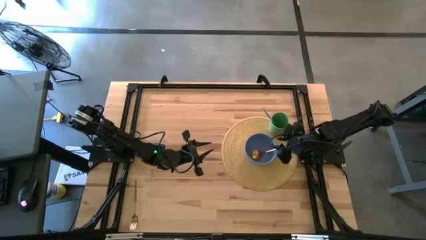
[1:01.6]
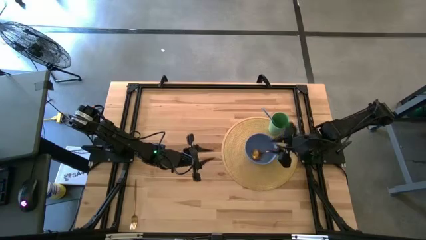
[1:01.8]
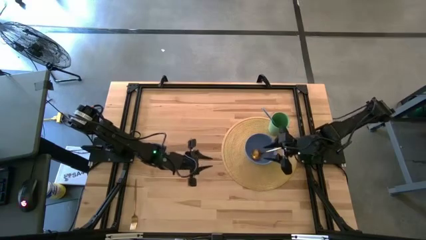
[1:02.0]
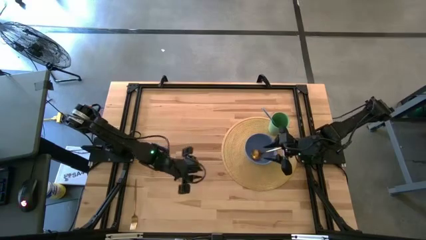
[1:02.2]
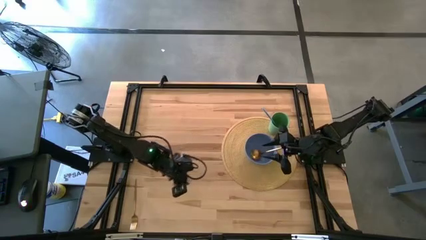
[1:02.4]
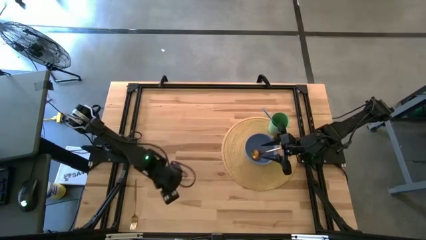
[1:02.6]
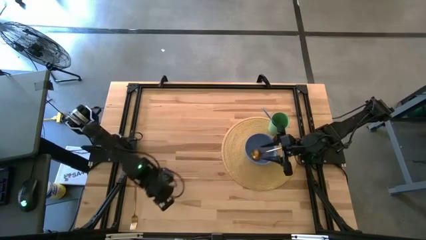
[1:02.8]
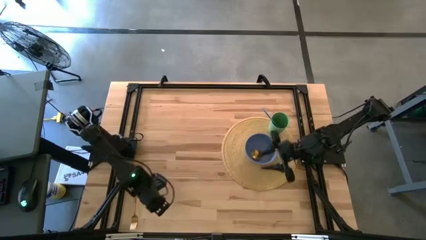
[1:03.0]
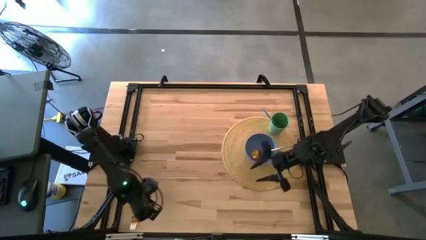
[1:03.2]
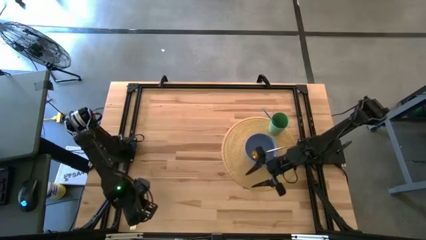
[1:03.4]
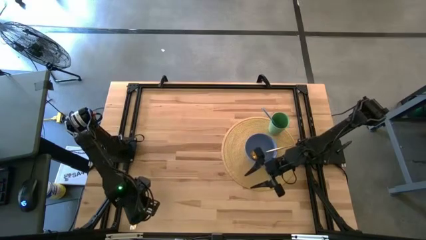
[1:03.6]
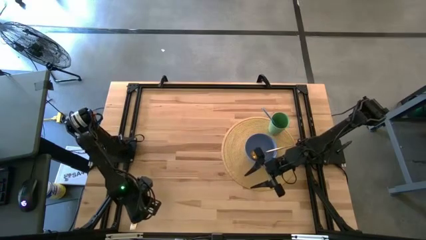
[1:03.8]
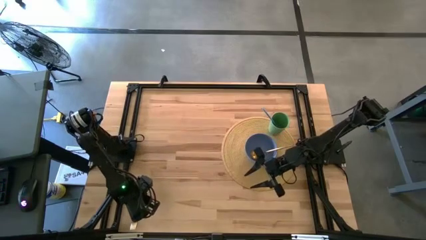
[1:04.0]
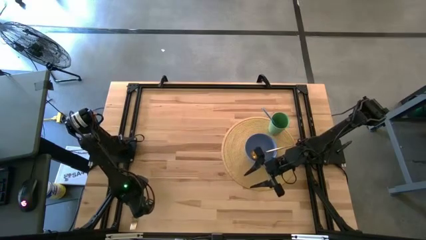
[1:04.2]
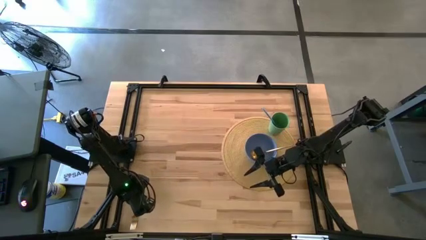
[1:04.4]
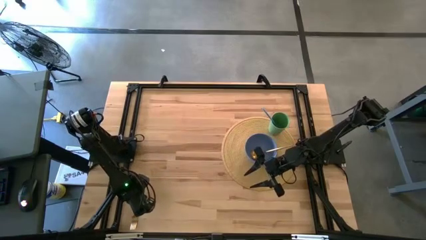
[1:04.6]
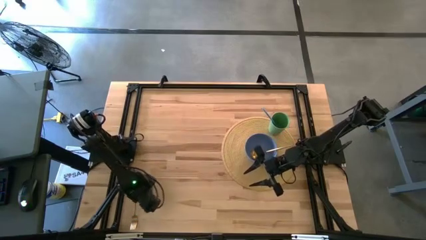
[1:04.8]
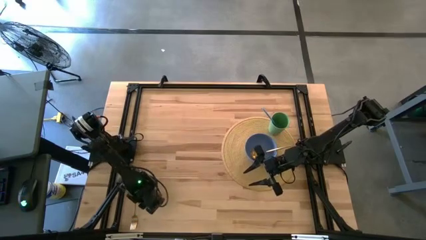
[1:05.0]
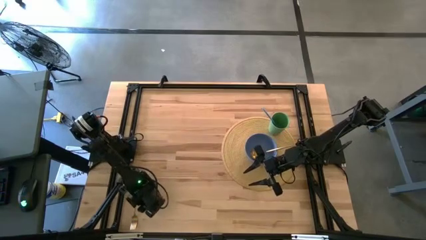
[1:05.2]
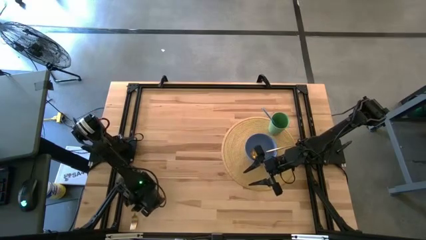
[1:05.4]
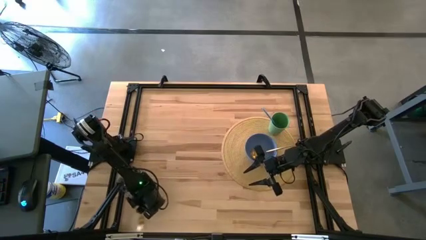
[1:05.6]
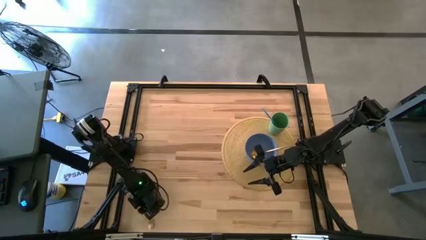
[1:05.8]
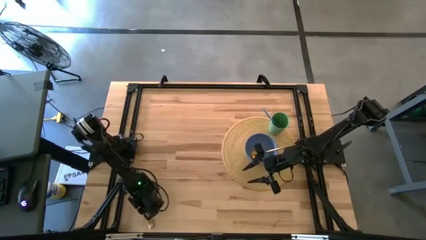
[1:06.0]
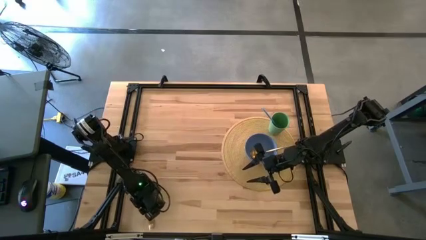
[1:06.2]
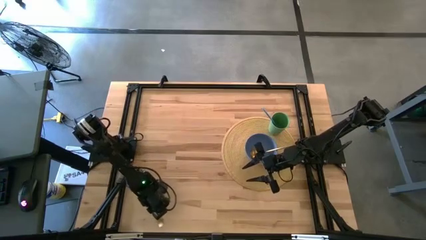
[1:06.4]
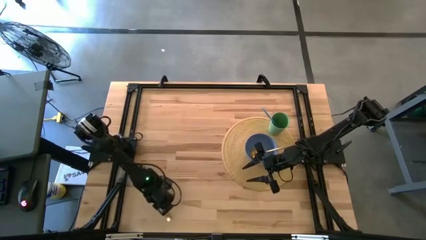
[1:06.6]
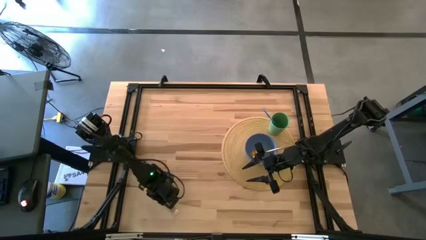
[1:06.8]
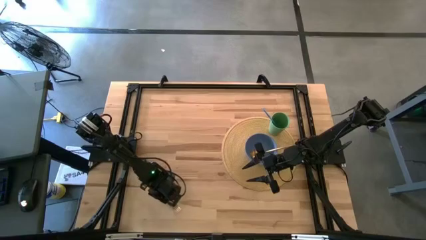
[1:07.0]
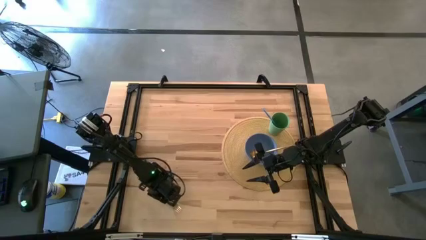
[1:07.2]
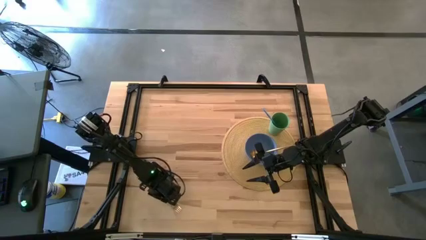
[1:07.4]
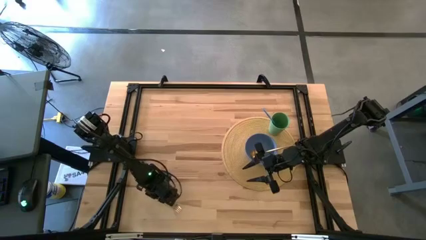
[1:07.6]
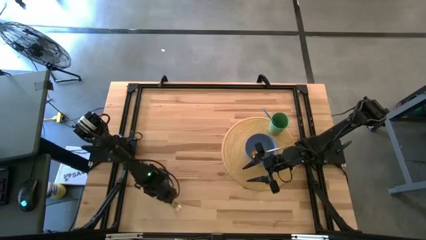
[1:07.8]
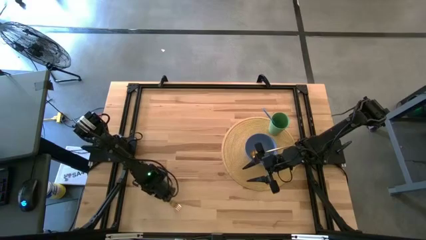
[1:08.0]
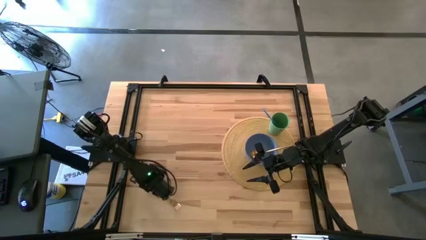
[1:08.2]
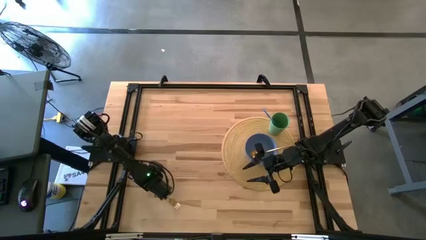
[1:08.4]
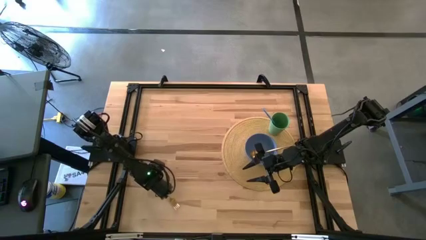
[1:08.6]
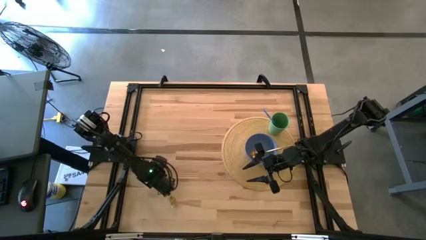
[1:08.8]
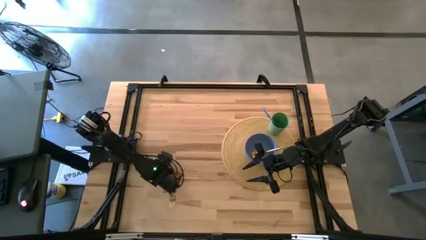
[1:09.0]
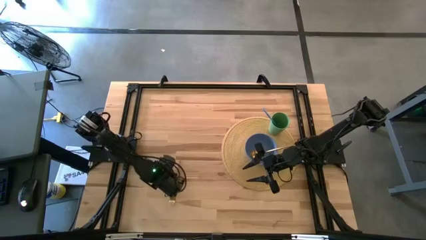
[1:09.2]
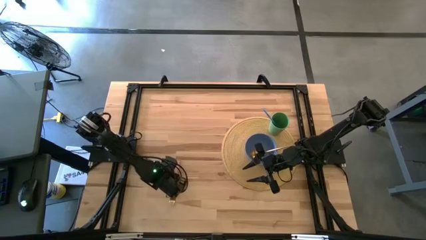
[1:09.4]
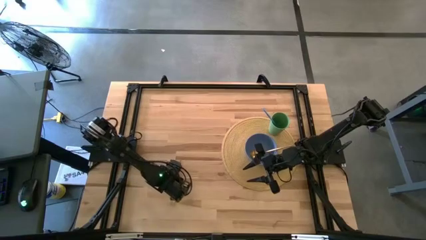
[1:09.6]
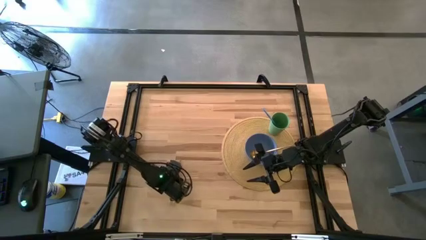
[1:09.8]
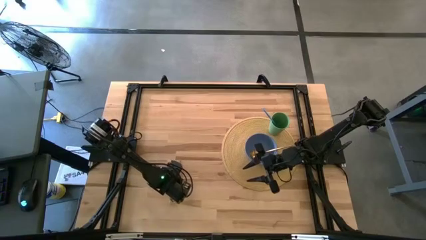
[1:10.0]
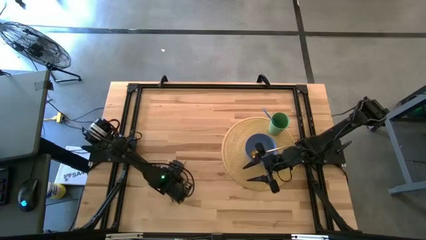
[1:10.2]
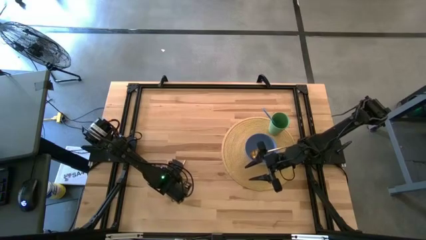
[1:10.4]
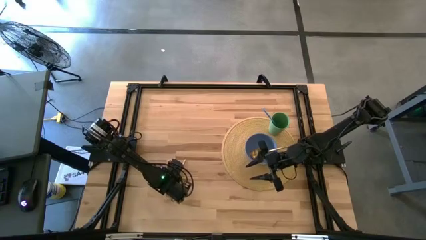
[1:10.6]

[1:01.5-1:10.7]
Task: Pick & Place Utensil
Put the gold fork into the violet bowl

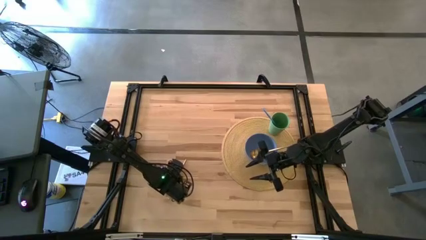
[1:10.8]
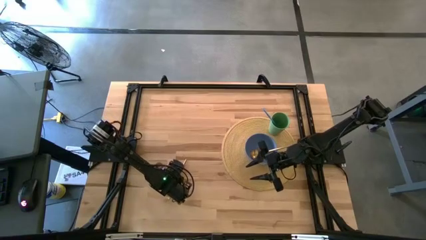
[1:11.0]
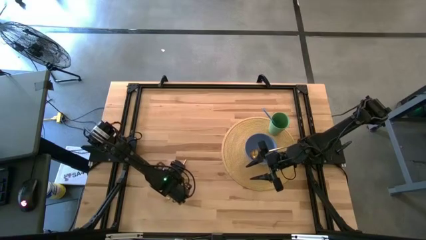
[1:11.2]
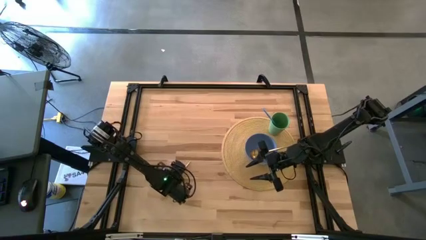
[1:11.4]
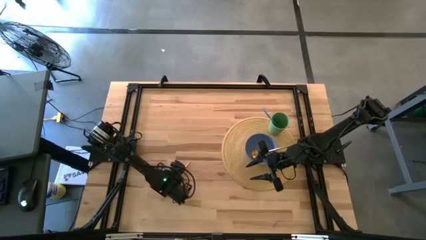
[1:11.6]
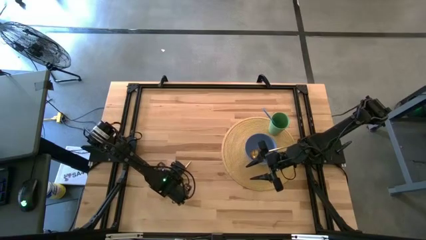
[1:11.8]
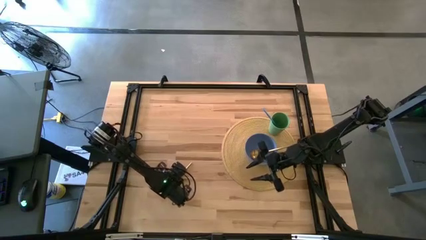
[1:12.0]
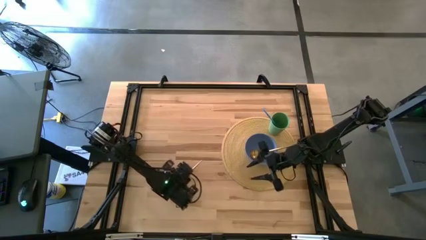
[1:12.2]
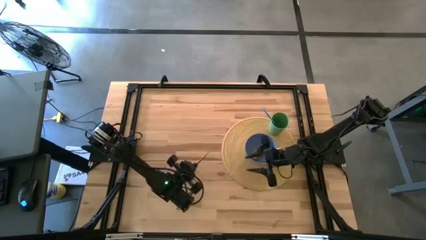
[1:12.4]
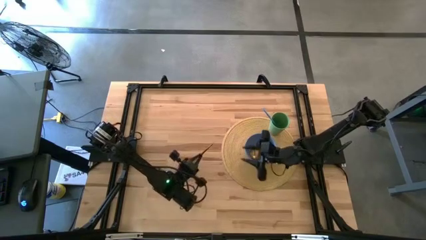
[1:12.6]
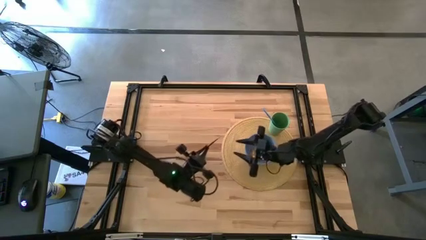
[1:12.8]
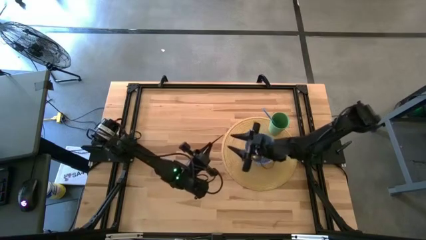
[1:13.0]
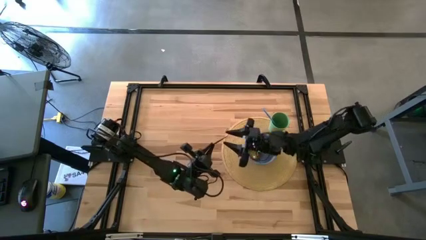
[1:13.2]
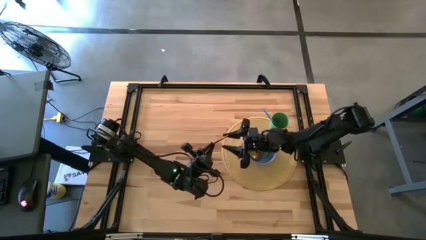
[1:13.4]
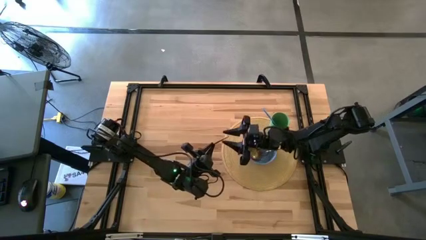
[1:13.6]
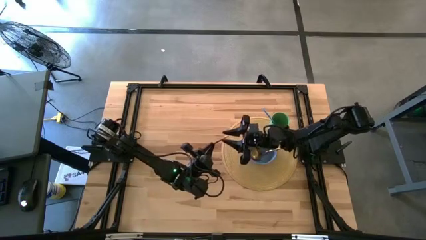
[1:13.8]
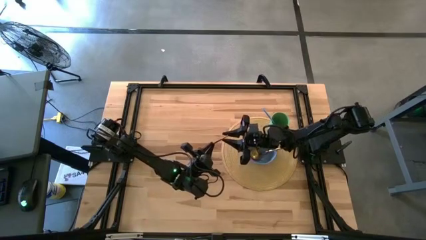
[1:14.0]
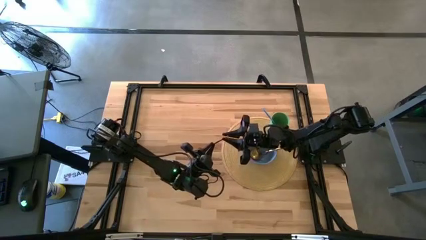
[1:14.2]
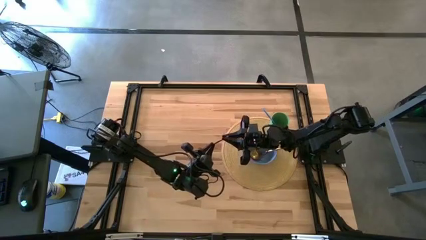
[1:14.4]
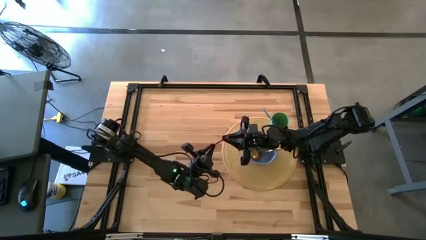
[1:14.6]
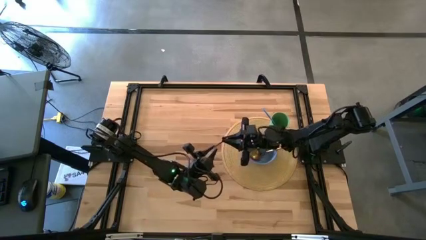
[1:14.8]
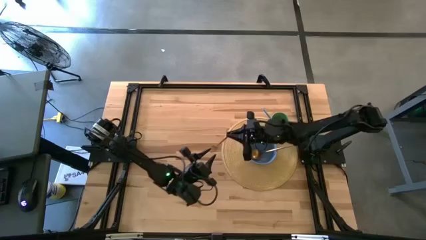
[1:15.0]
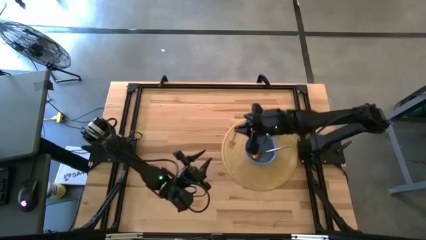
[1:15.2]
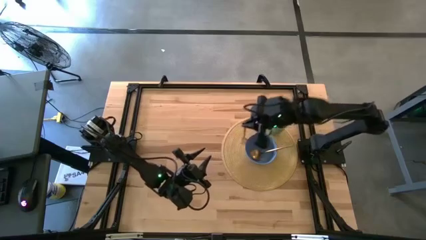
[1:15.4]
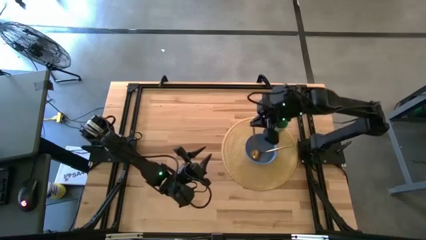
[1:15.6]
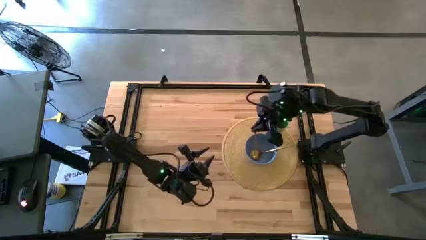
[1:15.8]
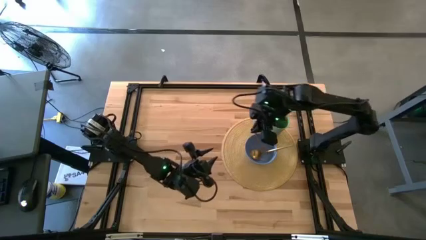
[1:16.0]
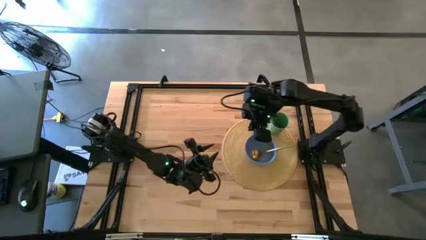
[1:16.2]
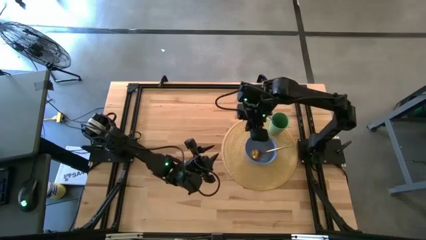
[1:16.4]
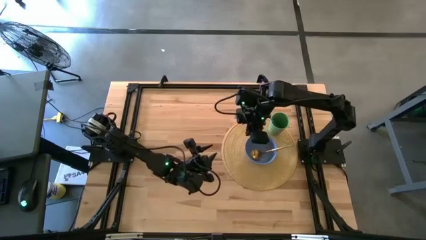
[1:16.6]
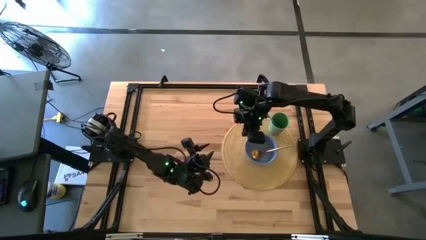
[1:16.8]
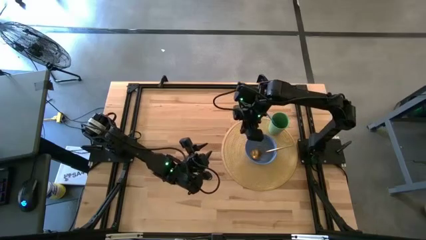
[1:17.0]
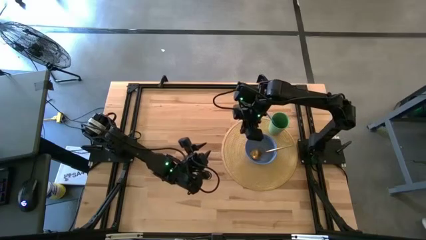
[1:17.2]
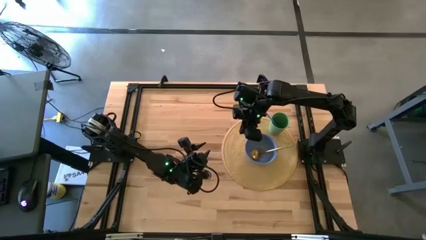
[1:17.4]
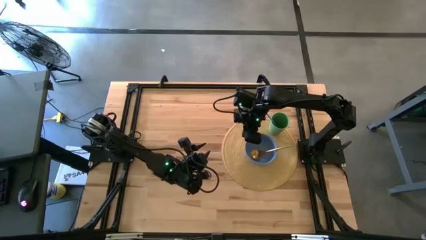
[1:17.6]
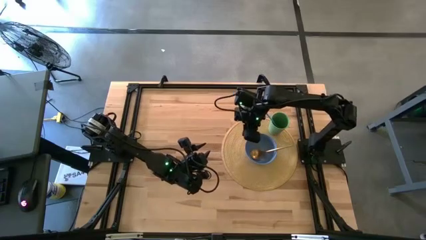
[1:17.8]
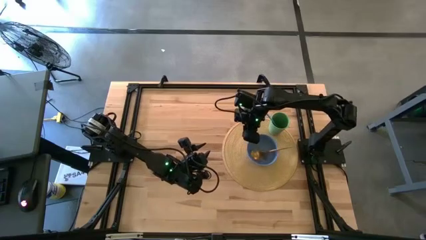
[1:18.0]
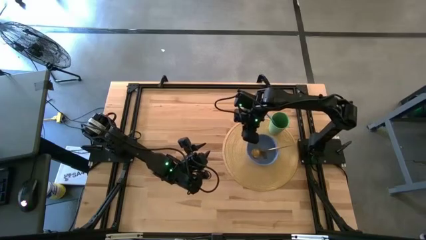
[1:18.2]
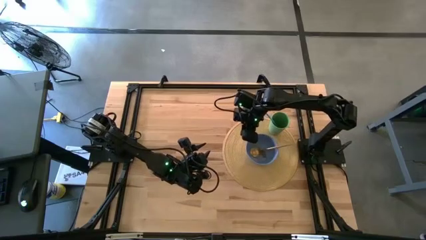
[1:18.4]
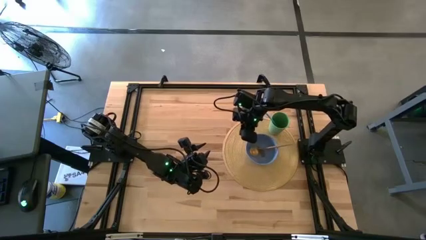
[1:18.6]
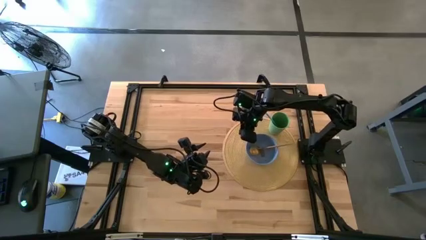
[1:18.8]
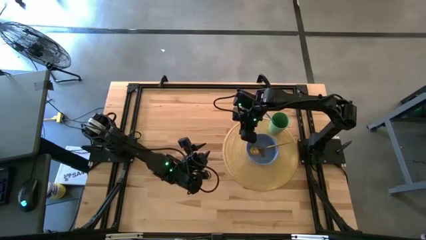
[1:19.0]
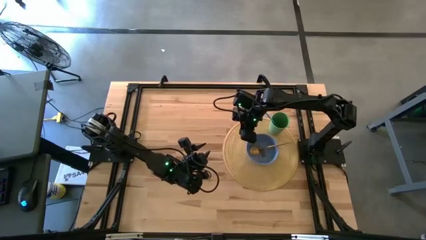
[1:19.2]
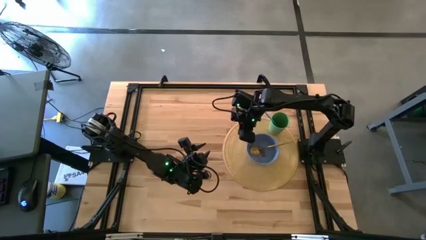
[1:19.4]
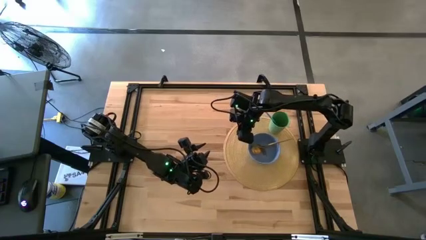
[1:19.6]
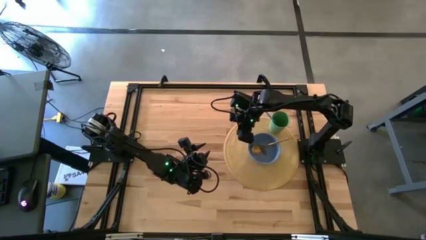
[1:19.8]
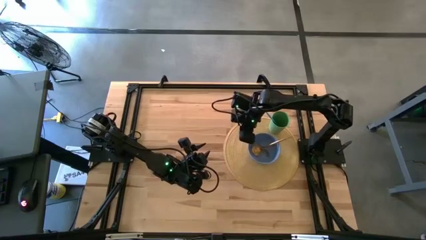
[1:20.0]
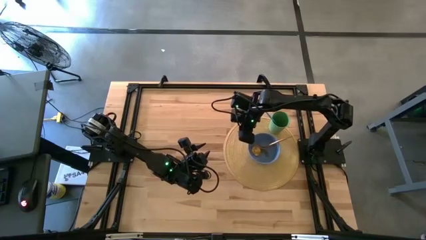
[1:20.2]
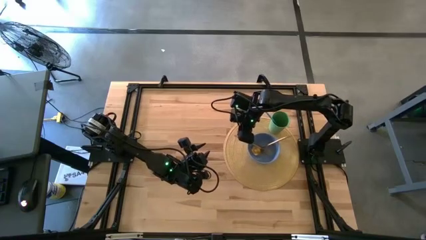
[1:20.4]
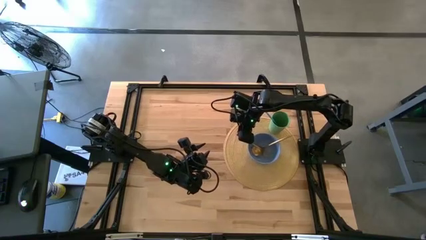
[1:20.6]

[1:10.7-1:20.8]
Put the gold fork into the violet bowl
